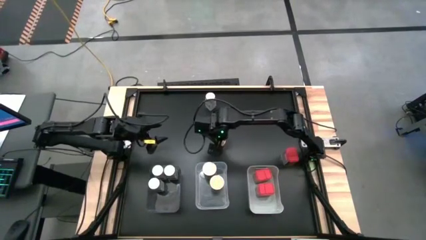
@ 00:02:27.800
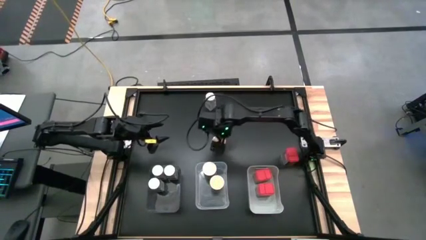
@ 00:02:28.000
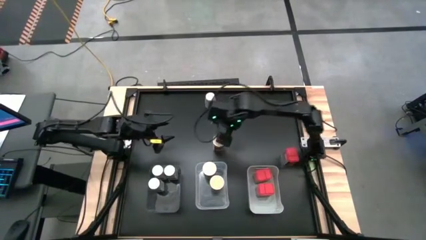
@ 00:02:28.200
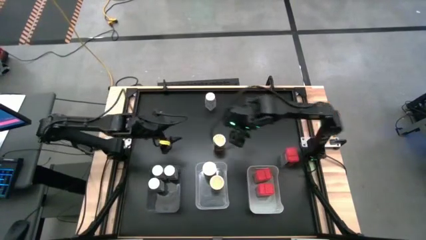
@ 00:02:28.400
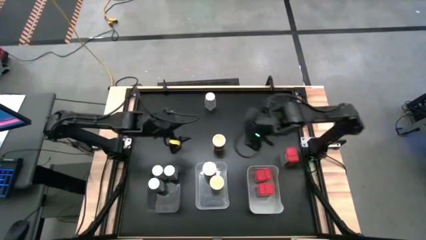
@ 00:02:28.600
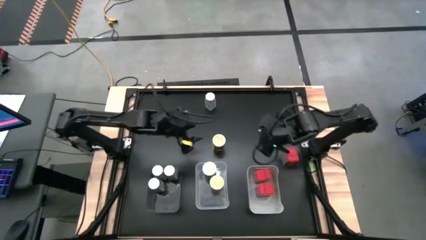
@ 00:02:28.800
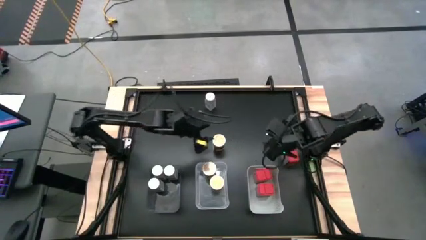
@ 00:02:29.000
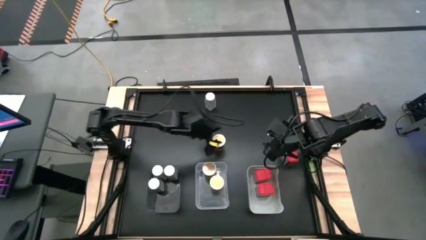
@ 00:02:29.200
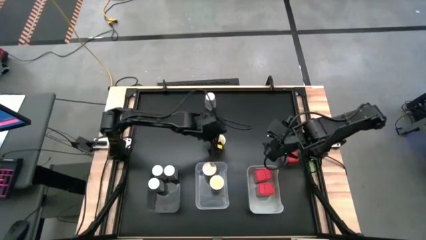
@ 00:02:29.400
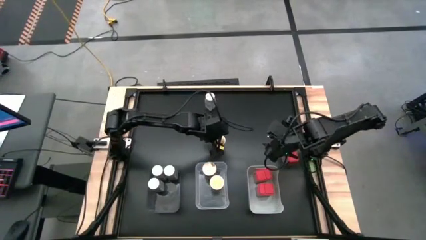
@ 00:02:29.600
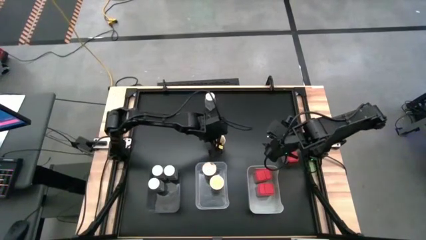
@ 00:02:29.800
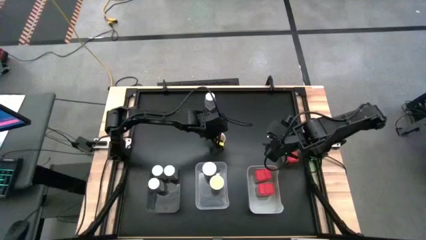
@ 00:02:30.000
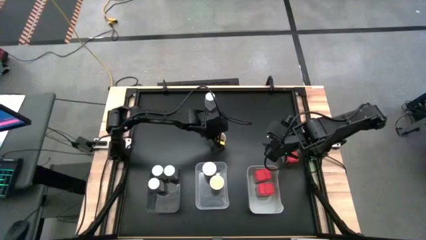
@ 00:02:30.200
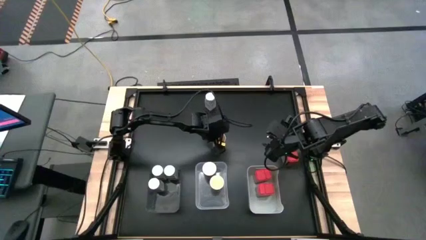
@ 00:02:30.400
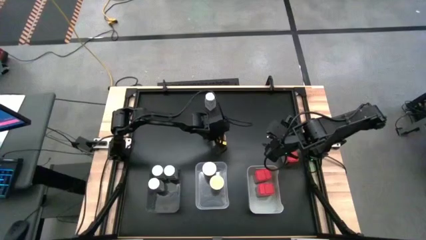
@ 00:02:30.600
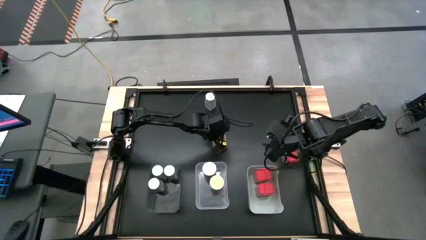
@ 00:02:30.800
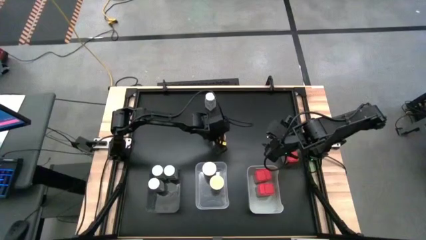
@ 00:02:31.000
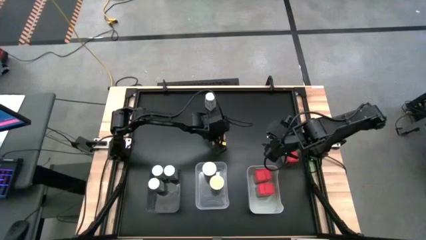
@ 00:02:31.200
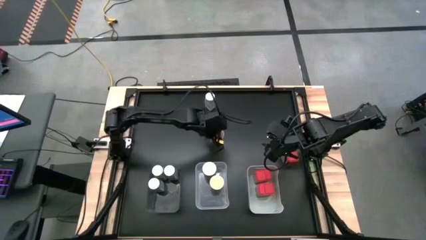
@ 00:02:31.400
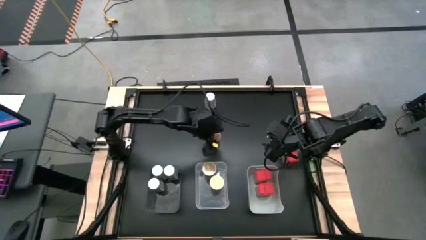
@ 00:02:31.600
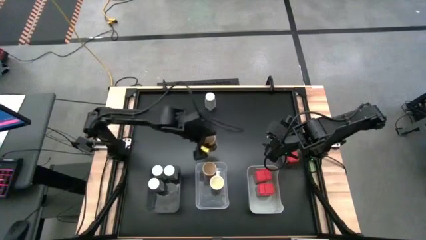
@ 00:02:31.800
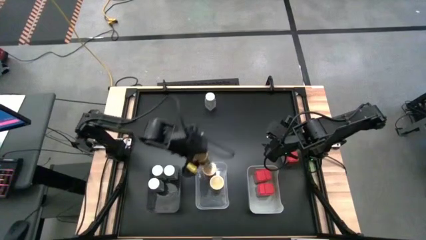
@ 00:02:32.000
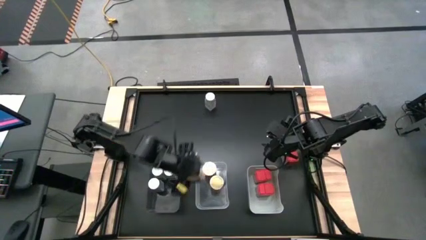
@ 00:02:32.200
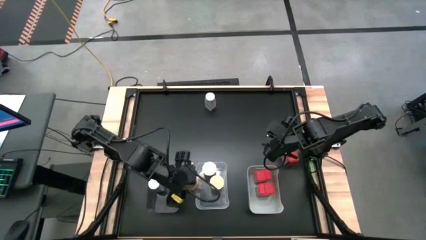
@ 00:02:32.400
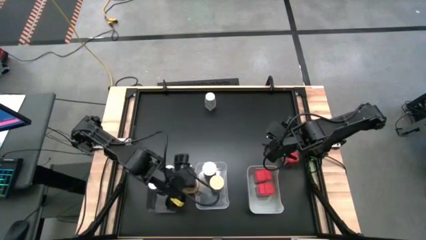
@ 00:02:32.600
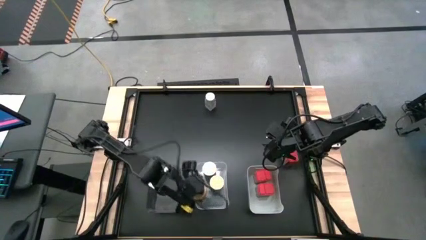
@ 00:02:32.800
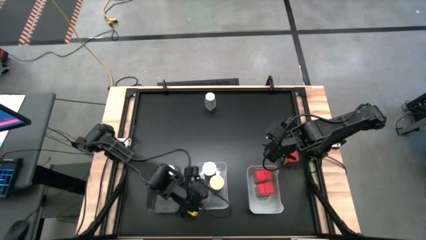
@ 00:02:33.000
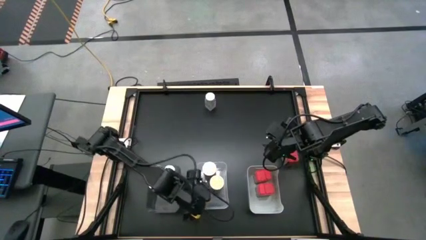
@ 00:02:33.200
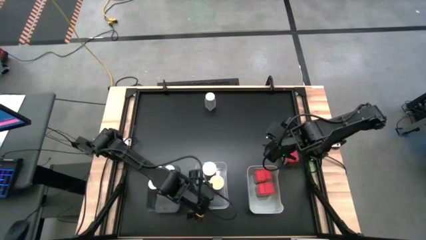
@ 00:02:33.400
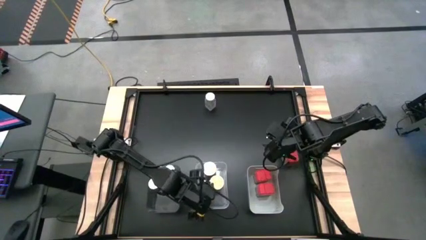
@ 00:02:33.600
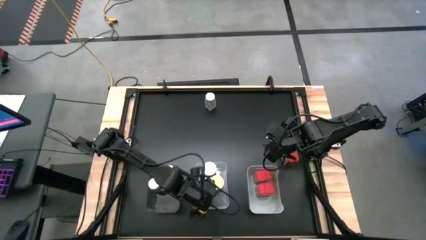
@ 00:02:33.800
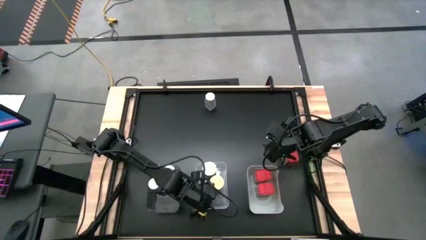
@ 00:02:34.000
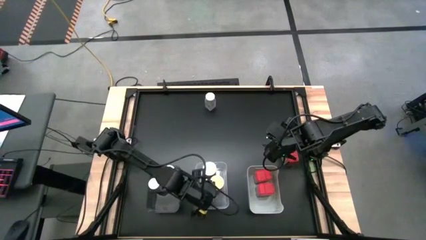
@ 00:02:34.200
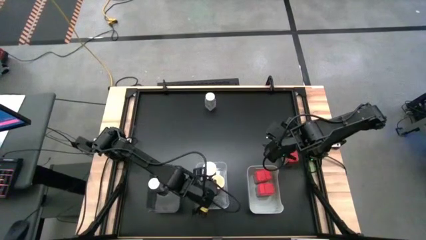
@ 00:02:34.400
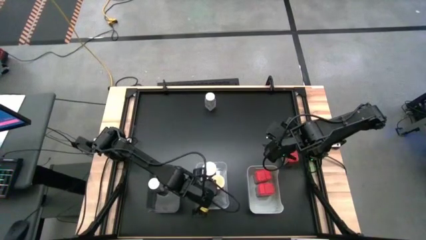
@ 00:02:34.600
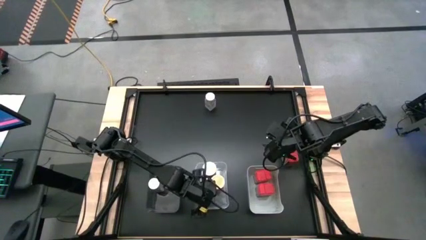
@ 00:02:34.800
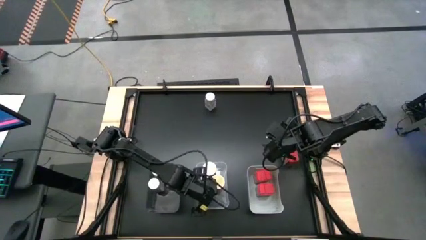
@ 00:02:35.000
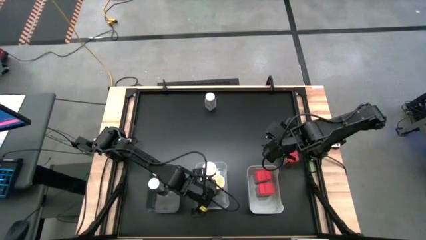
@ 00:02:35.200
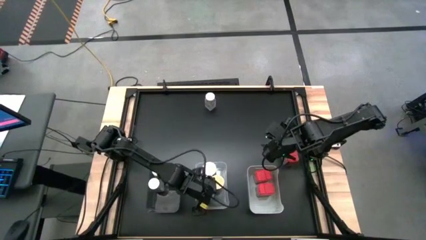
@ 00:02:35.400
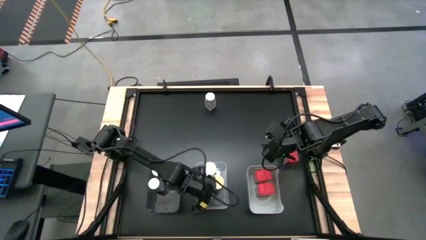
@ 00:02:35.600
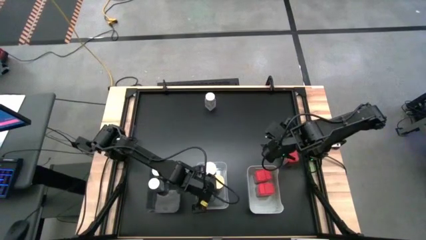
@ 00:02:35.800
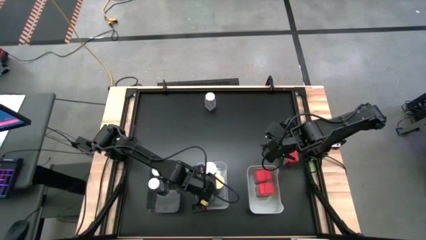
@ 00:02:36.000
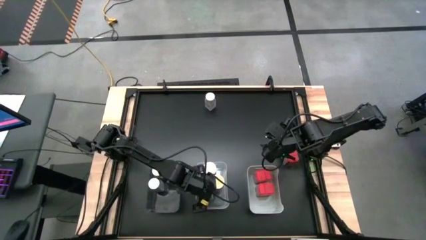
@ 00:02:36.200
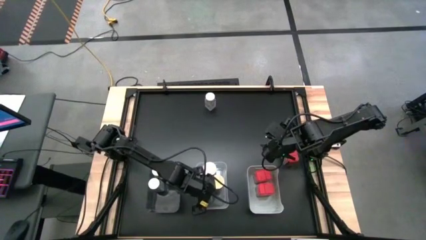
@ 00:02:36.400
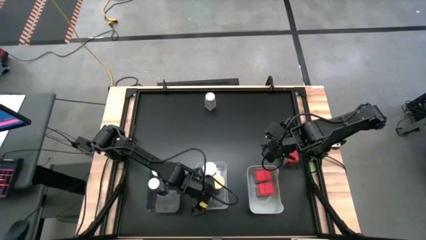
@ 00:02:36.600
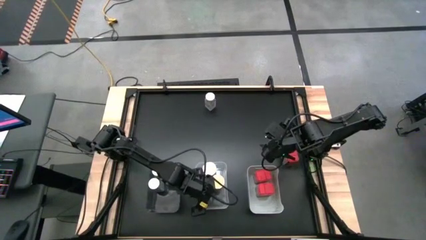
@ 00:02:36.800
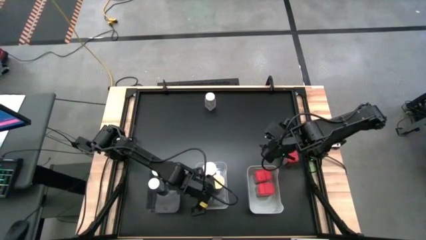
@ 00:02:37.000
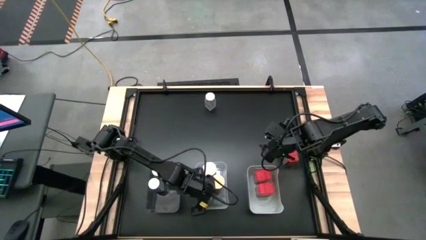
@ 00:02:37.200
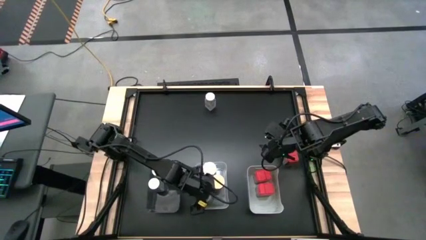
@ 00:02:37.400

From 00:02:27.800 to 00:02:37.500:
Task: Sort spices by type
Put the golden seasoning bottle into the transparent bin

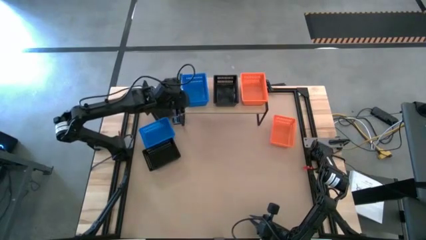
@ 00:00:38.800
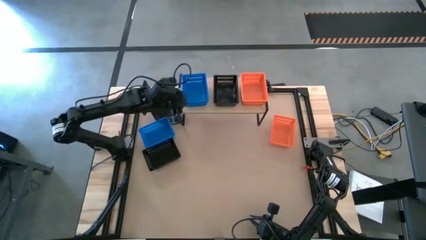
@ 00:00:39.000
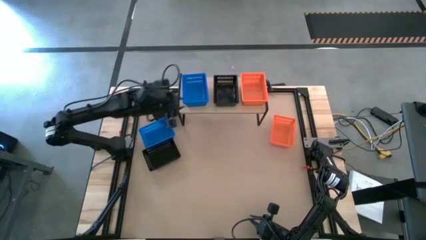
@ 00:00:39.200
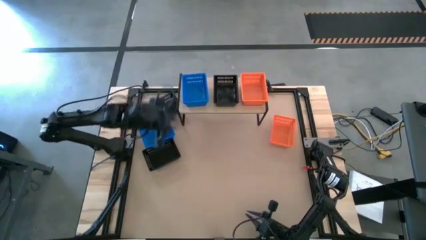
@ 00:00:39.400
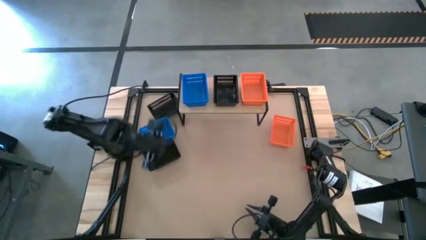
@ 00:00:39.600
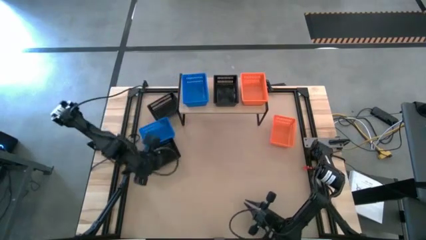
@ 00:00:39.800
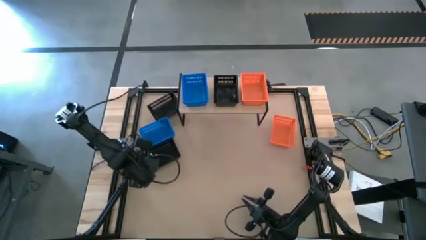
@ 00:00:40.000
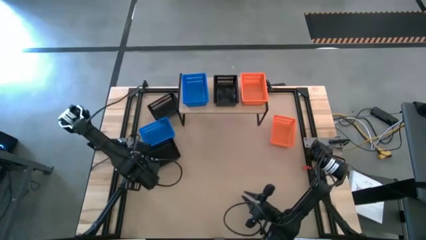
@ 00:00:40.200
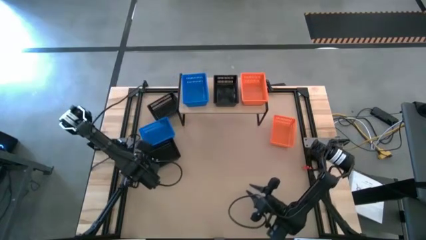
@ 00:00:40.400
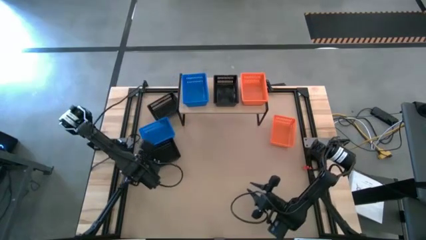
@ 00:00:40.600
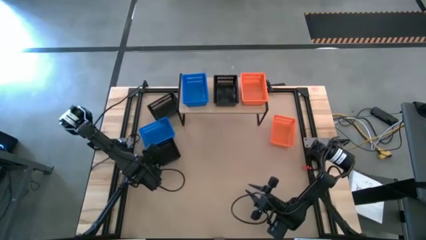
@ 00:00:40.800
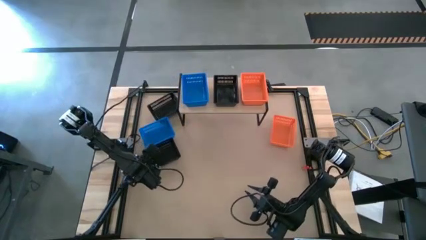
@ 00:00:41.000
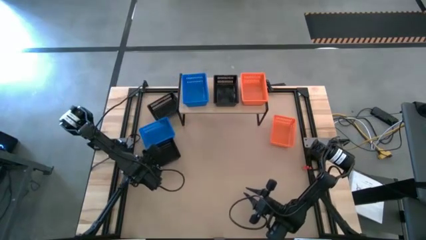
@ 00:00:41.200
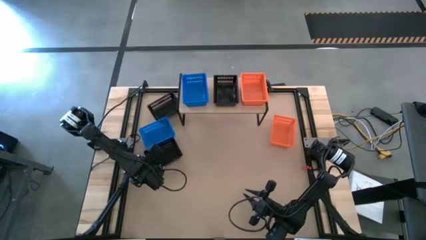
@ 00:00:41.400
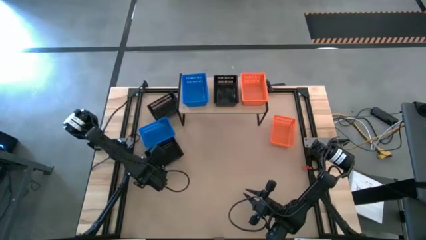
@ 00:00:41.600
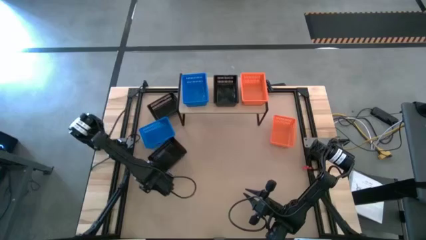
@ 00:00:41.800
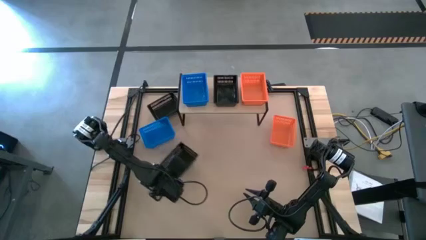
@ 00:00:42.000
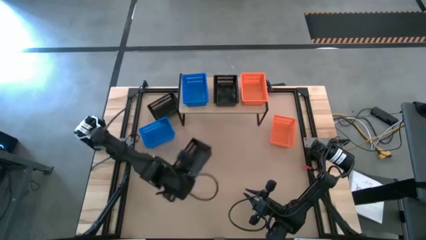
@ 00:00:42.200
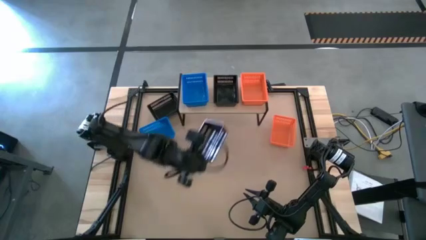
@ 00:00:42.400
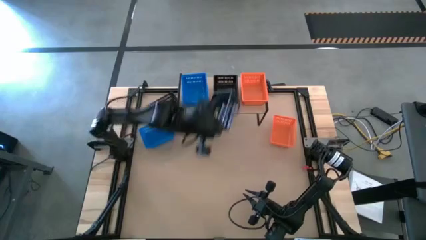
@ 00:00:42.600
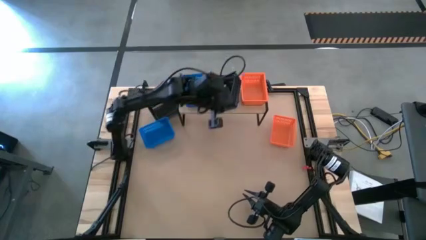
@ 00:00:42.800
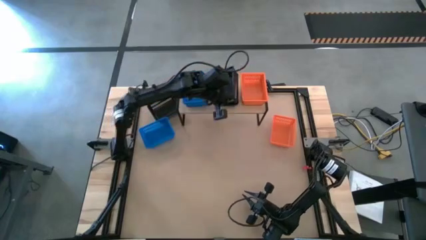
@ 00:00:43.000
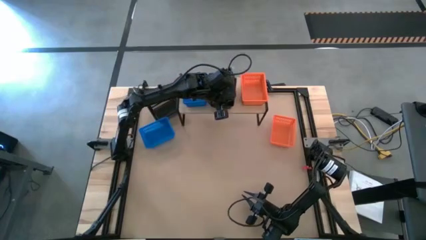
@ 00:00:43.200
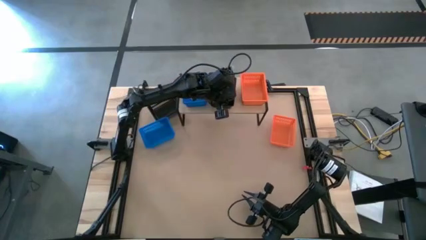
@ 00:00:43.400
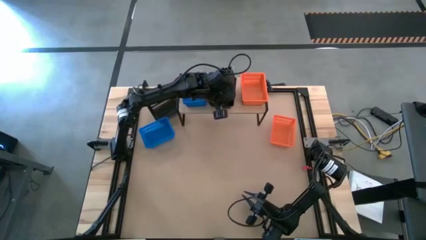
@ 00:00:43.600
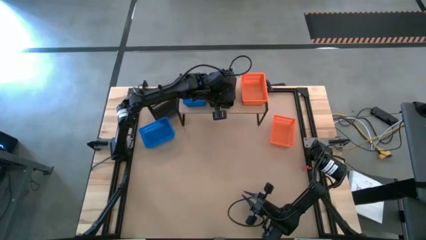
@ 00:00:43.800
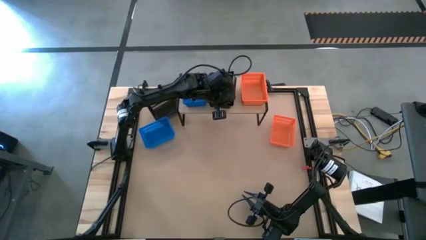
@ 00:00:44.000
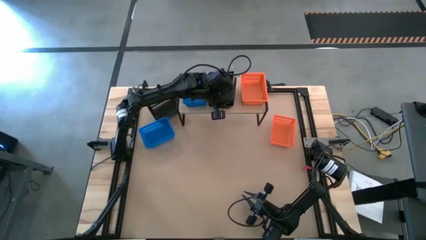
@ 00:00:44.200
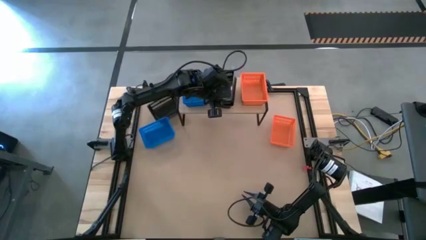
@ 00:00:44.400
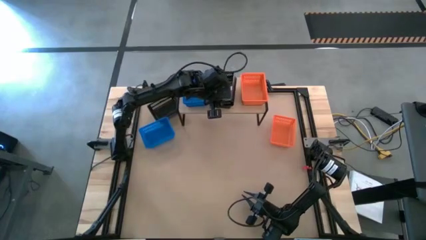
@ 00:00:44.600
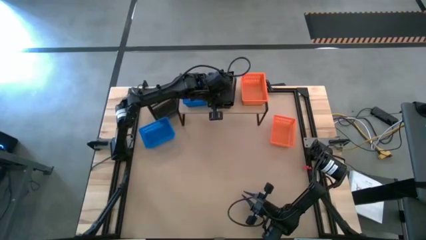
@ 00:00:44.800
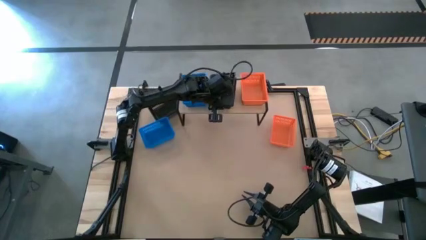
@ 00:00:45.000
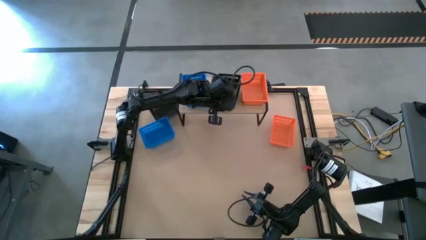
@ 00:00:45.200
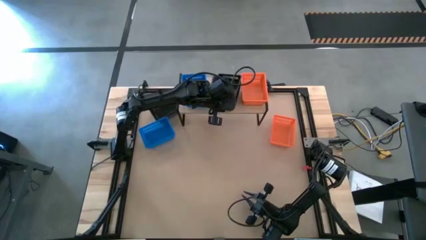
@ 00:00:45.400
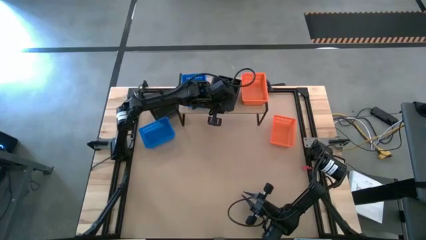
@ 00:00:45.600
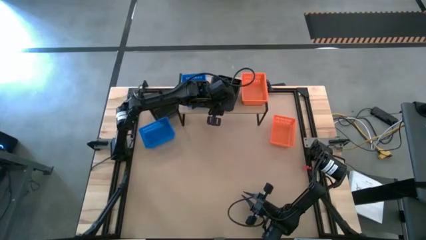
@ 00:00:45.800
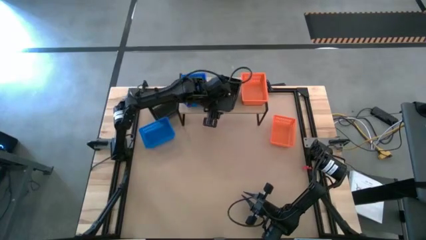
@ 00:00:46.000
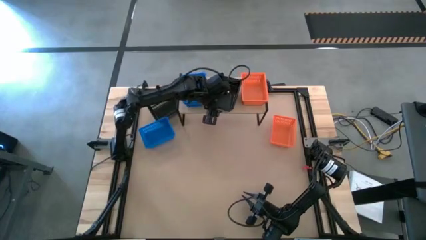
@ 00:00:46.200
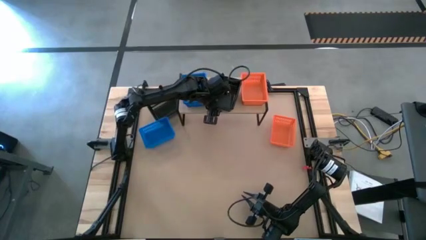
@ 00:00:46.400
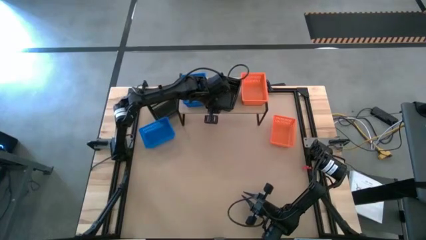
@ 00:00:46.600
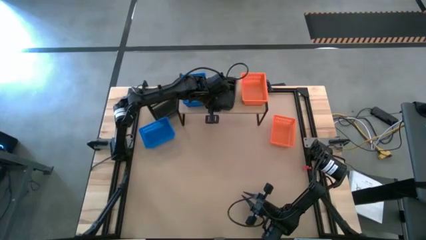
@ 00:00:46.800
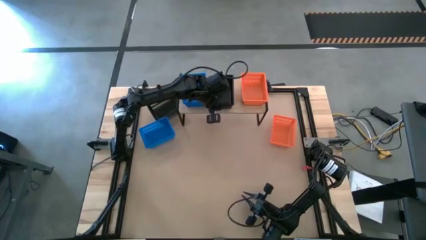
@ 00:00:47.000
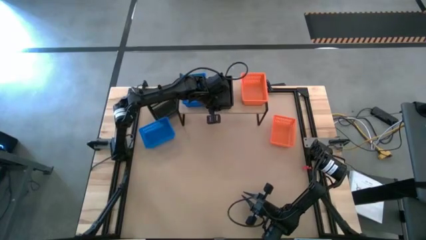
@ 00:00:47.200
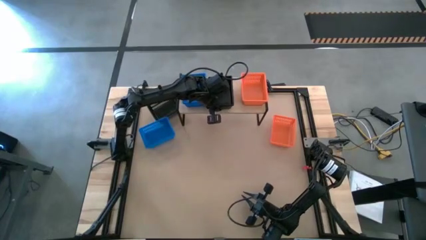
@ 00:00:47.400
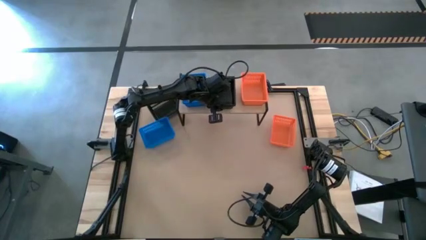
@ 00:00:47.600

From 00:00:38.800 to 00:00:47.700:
Task: Stack baskets on shelf by color
Stack the bottom black basket on the black basket on the shelf
